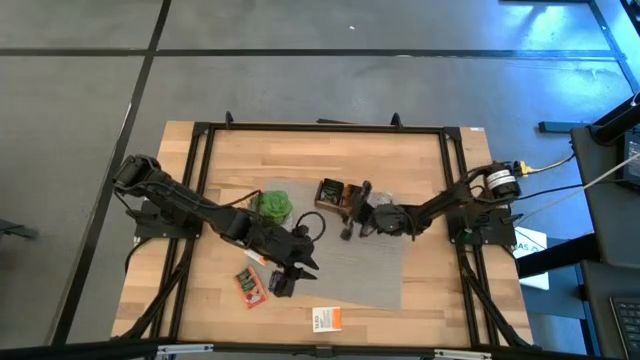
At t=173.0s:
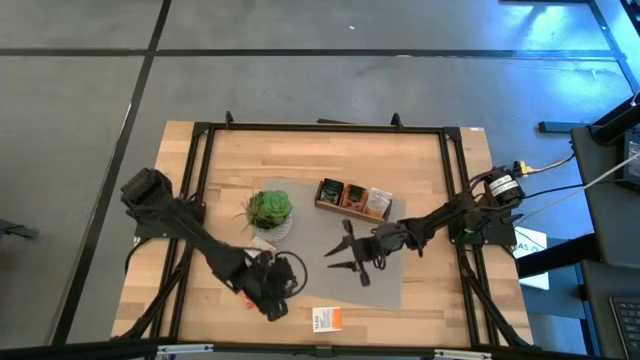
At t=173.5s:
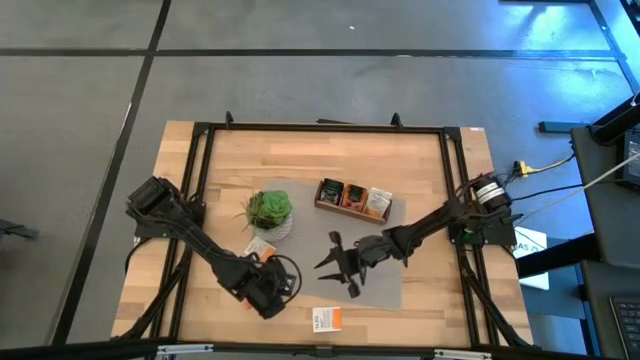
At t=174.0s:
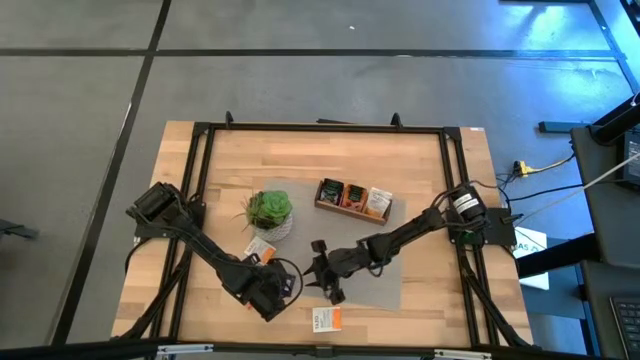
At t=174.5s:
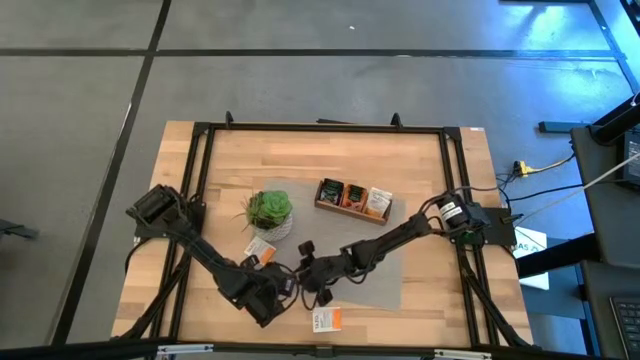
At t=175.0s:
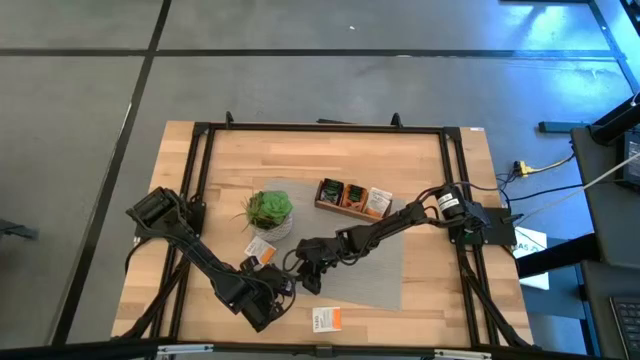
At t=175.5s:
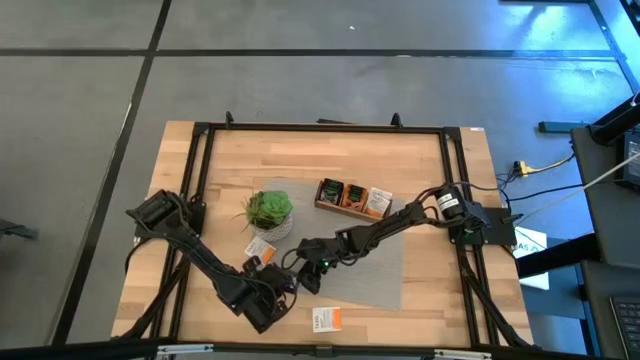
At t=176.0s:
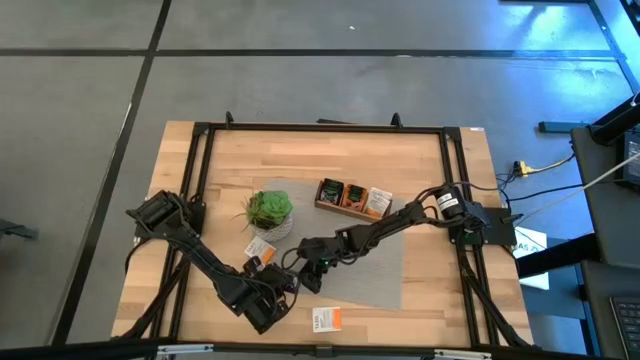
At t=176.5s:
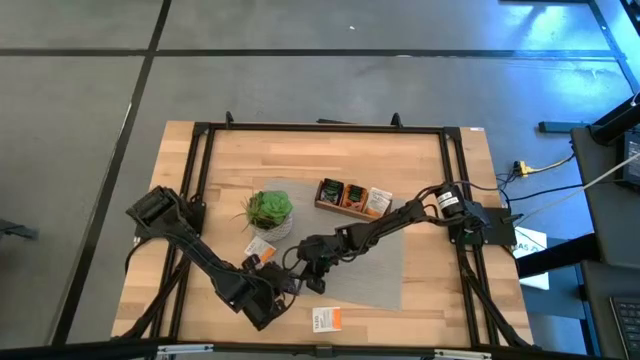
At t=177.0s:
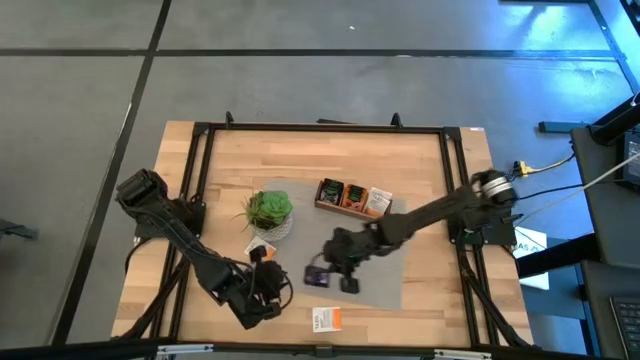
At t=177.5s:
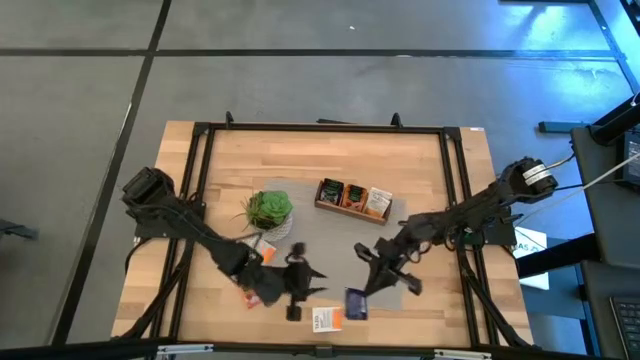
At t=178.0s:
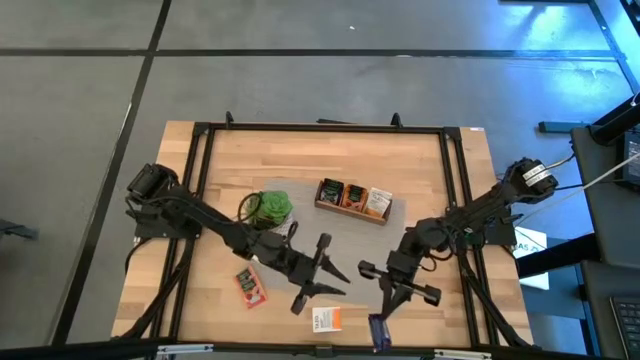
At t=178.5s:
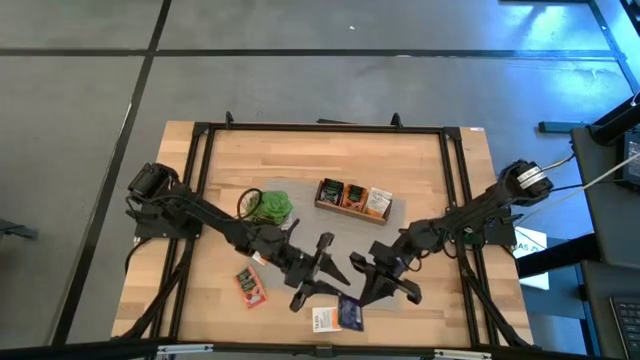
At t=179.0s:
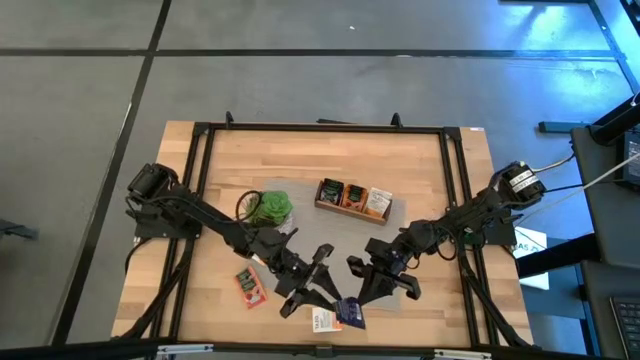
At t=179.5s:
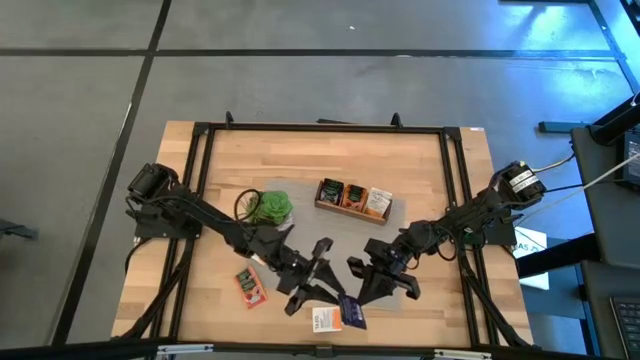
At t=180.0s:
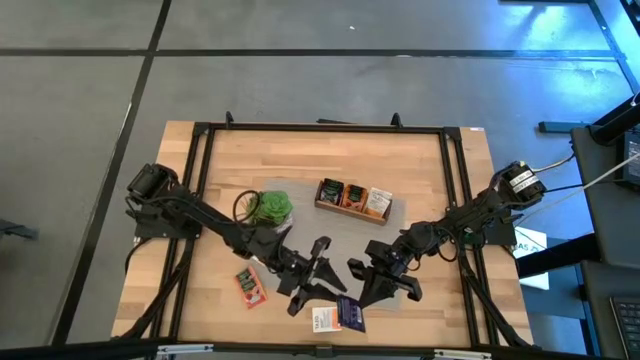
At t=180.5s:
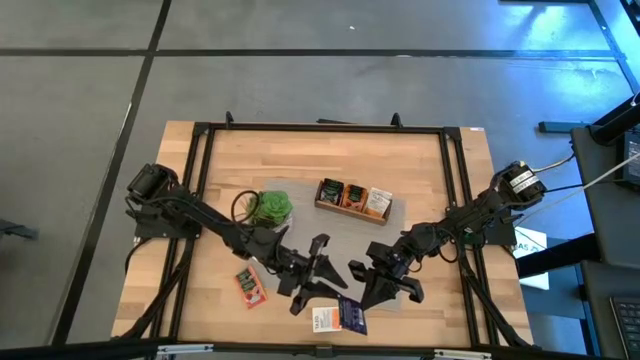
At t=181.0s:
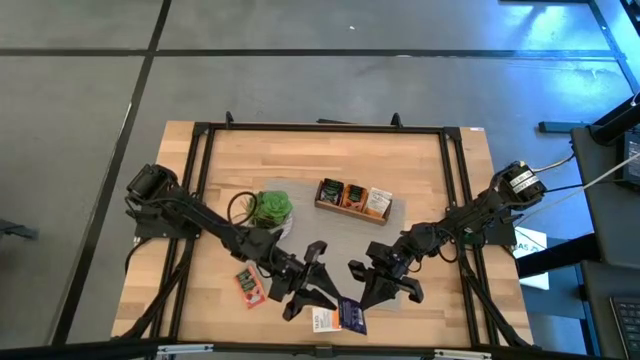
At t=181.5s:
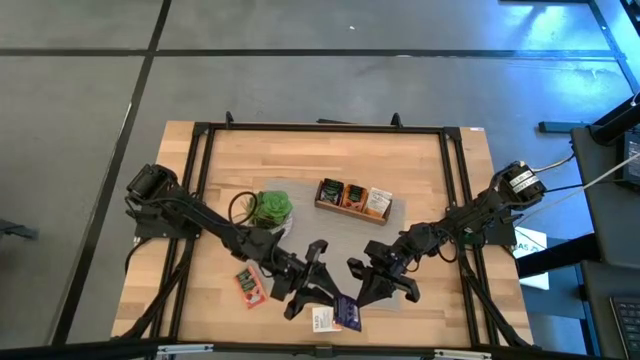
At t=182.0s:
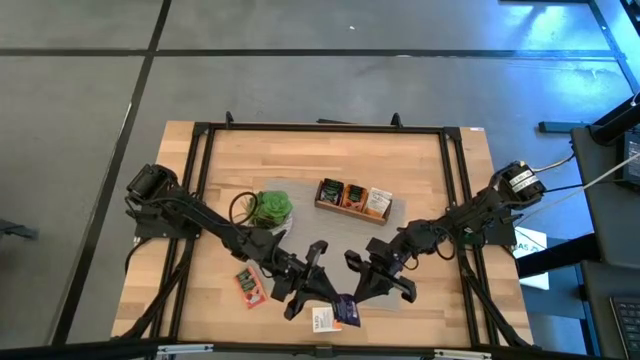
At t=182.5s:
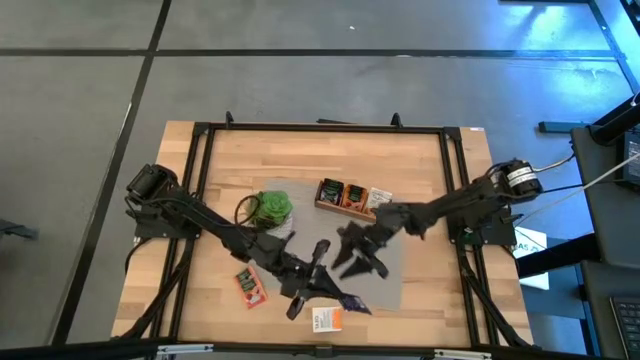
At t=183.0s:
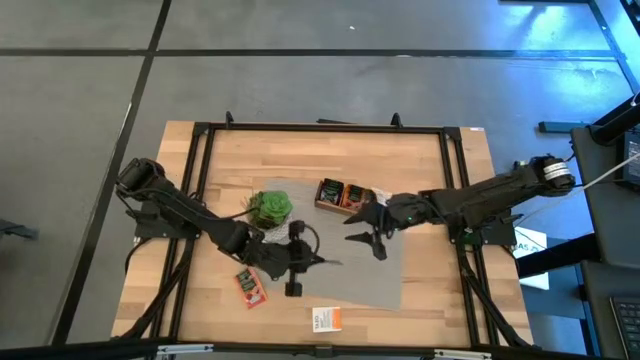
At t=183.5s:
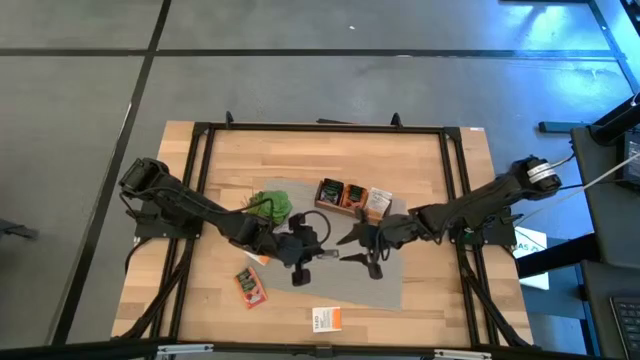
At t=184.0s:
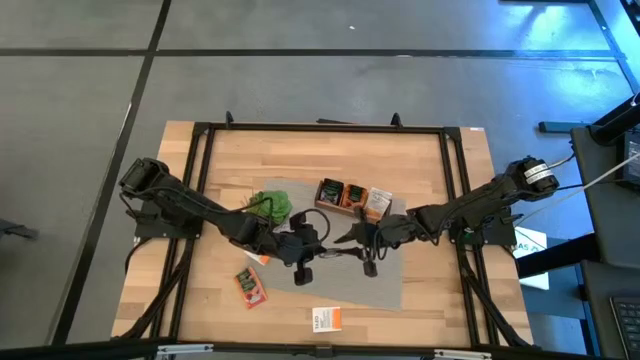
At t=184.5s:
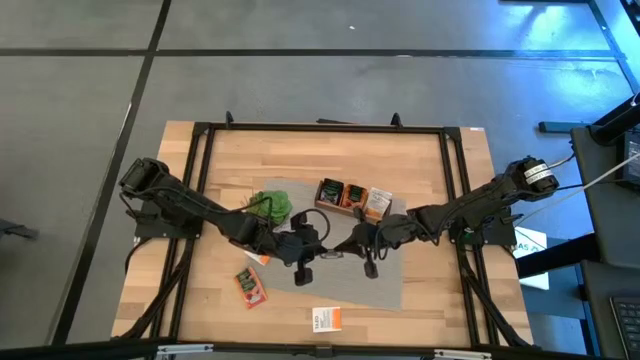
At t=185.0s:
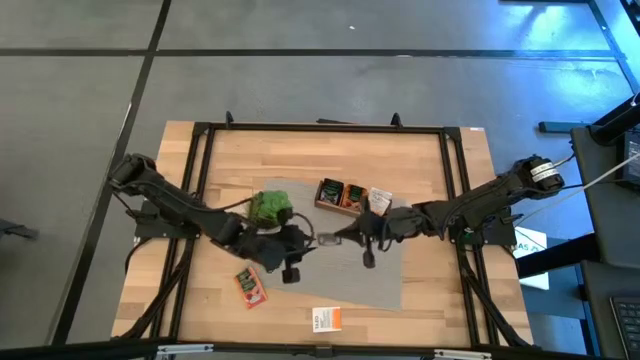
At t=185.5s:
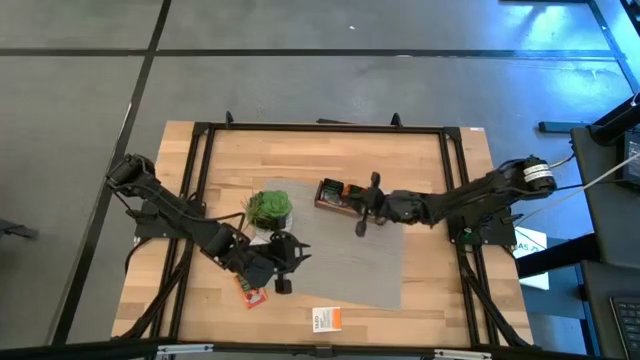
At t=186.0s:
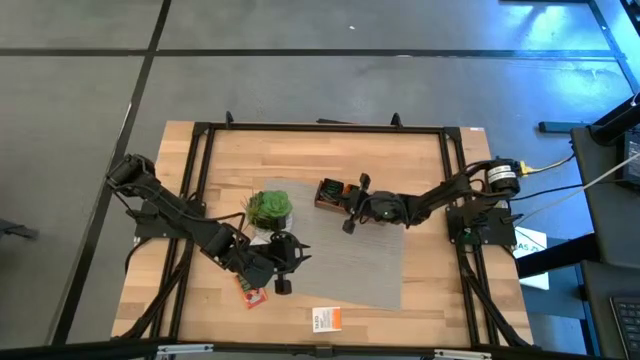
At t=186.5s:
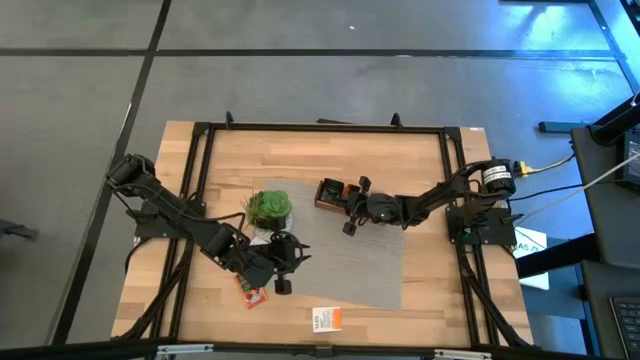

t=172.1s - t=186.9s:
Task: Pick & Place Tea
Put the violet tea bag into the left section of the wooden organizer

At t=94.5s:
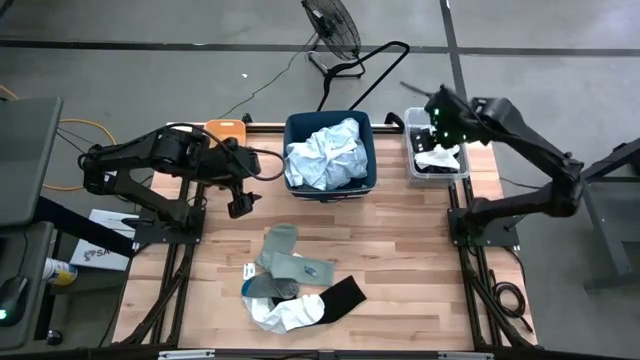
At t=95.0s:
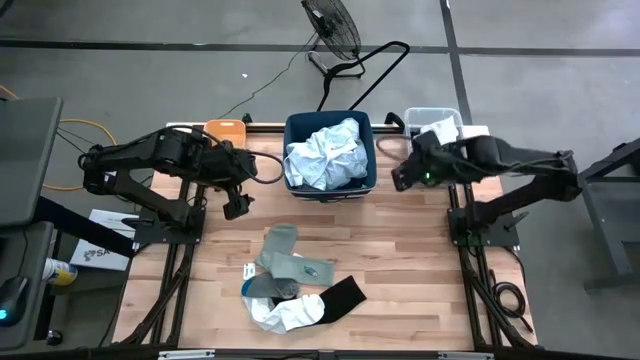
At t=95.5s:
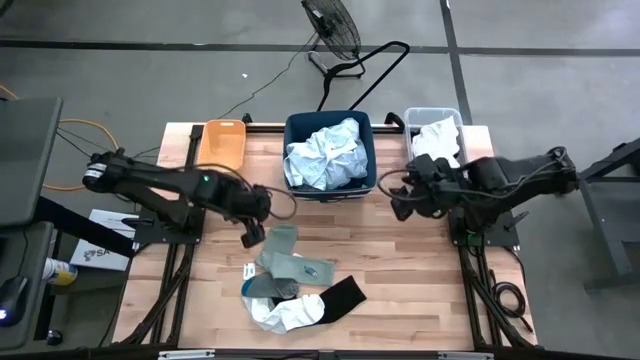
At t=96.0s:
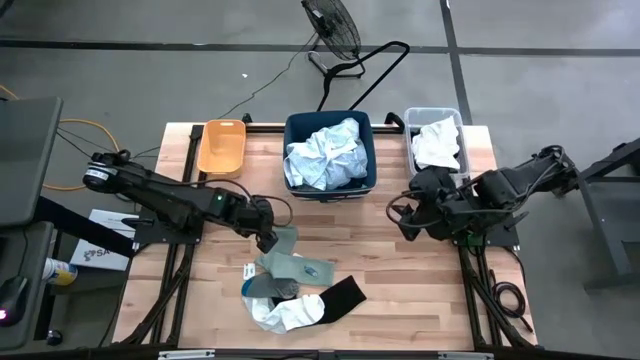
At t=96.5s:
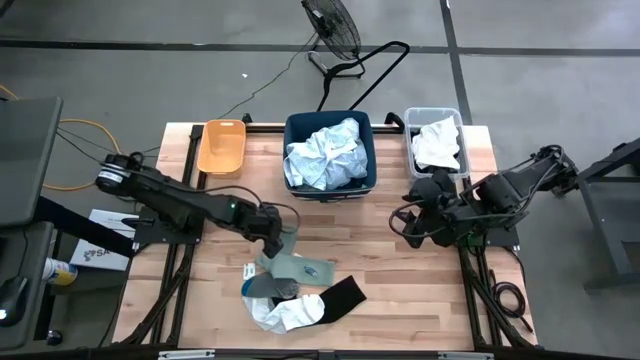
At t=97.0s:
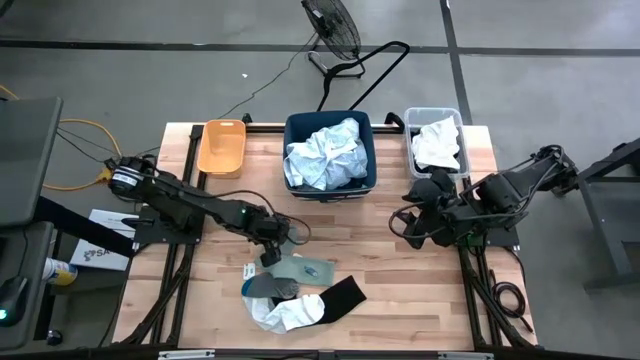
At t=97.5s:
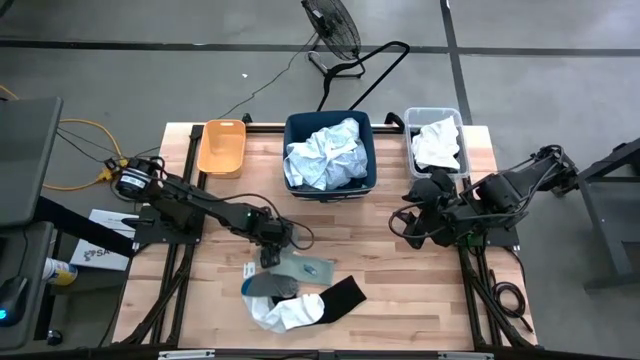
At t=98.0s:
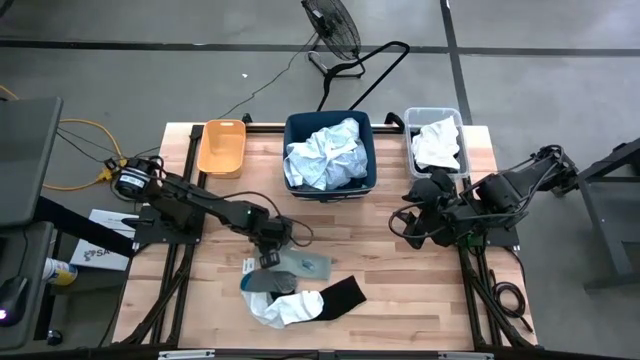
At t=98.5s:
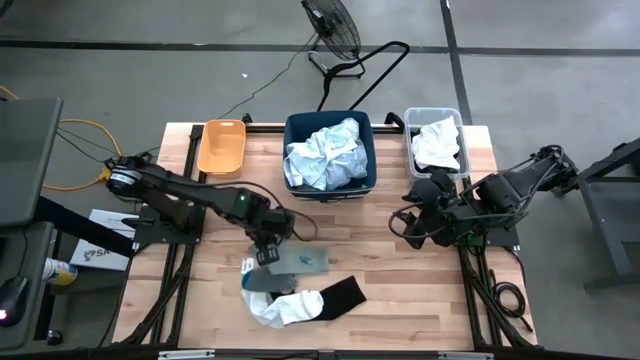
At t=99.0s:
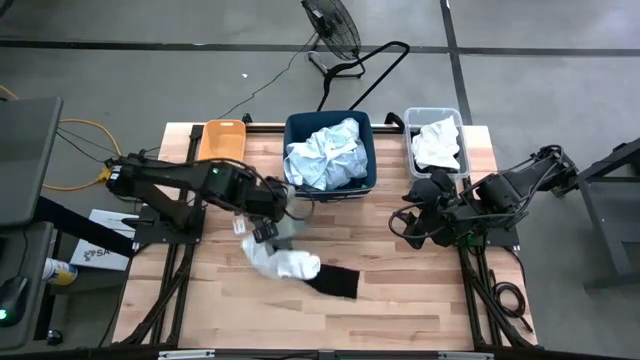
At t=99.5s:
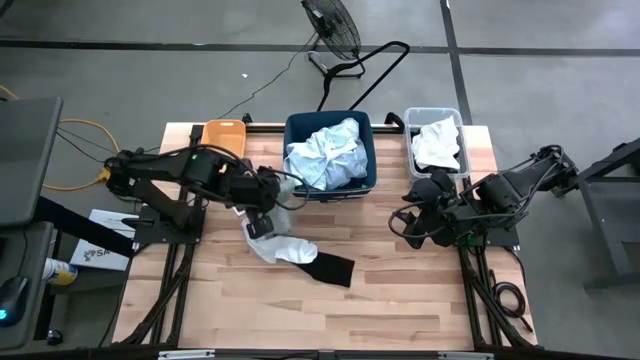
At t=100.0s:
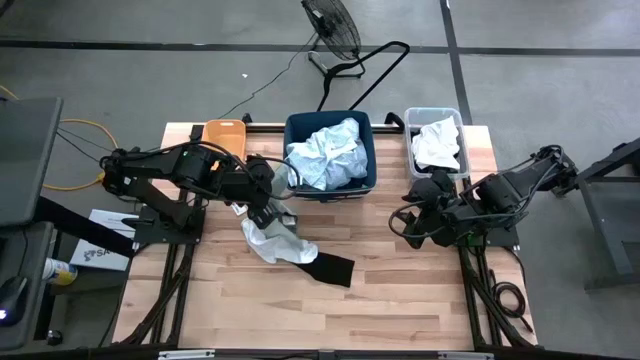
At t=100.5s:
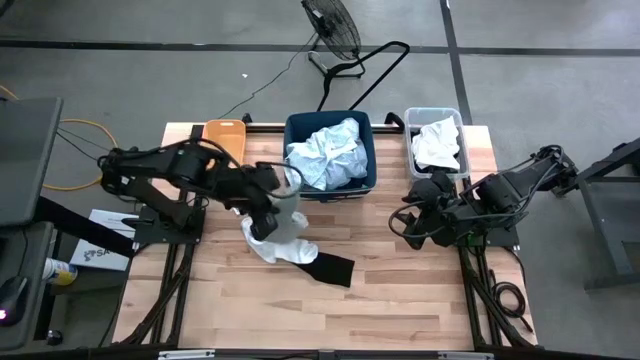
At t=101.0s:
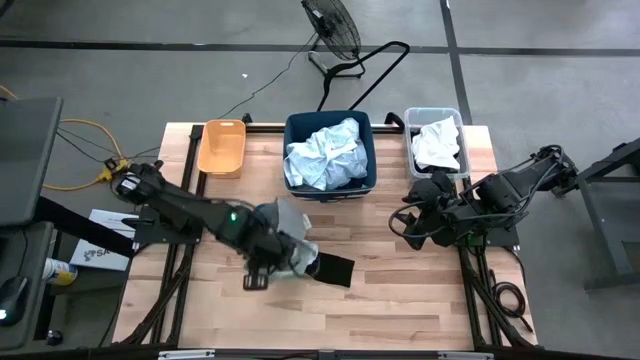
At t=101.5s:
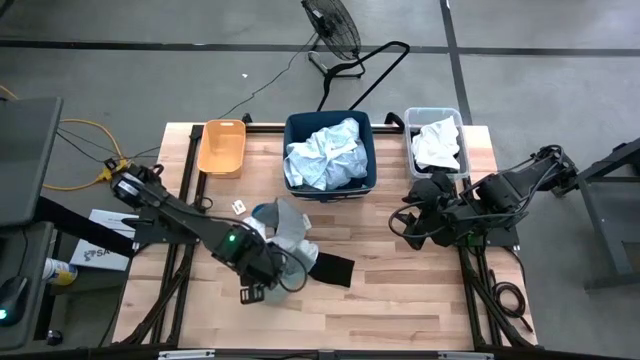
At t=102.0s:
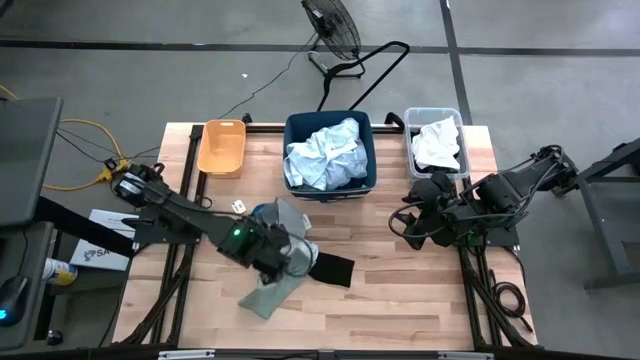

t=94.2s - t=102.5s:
Task: Pick & Place Cloths
Put the gray sock into the yellow bin
